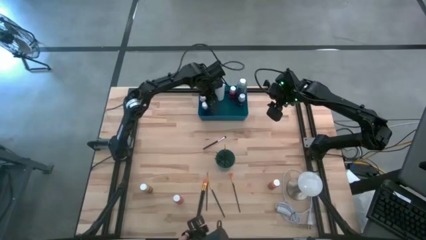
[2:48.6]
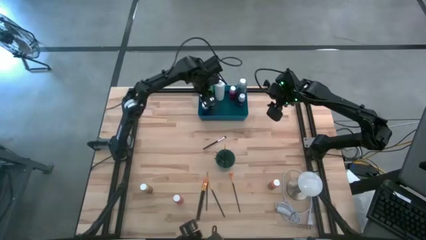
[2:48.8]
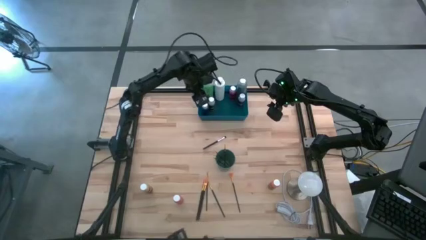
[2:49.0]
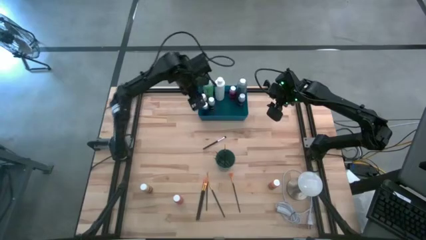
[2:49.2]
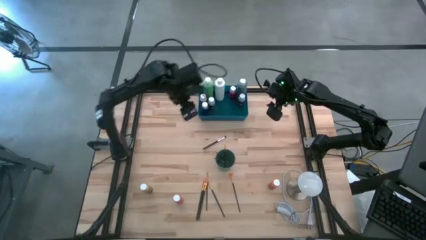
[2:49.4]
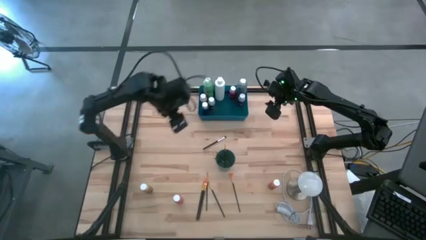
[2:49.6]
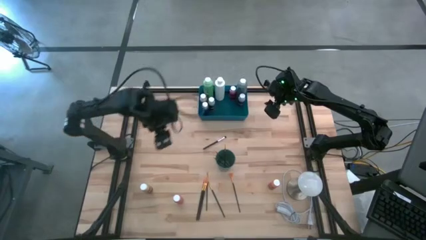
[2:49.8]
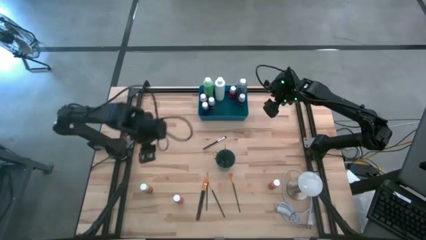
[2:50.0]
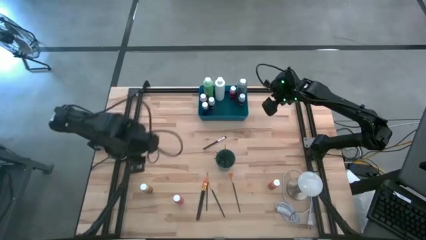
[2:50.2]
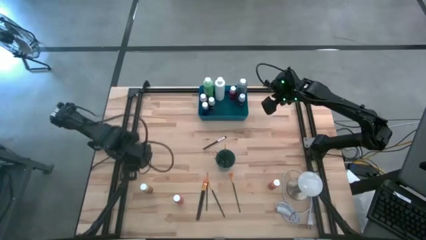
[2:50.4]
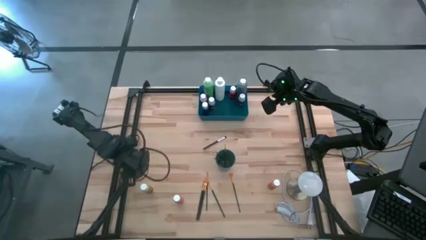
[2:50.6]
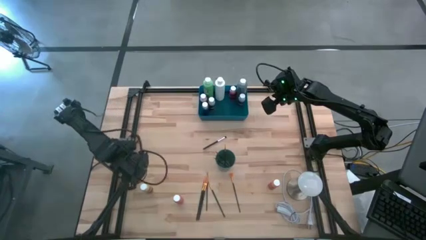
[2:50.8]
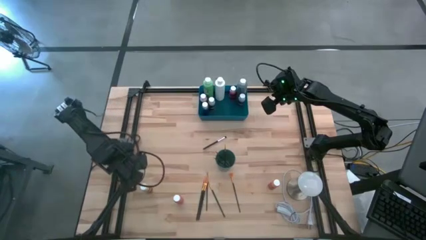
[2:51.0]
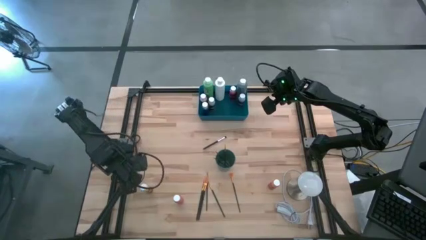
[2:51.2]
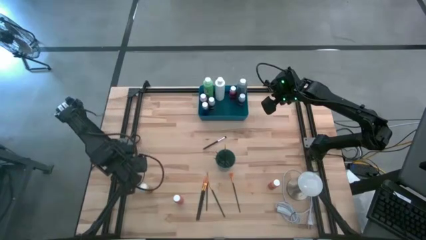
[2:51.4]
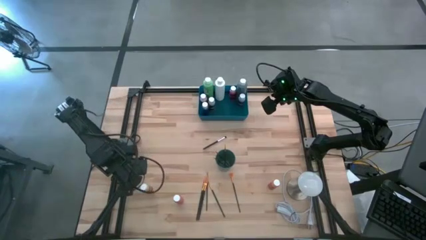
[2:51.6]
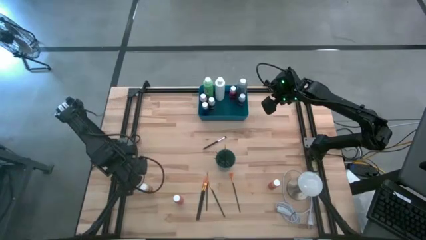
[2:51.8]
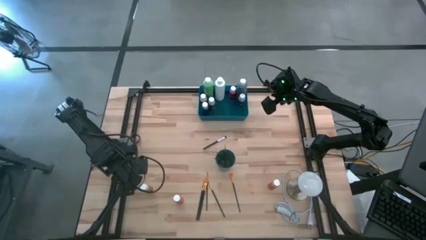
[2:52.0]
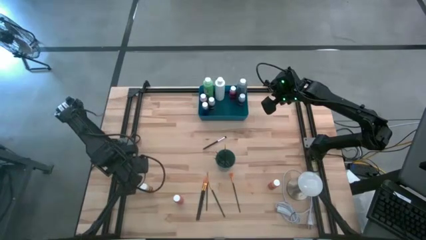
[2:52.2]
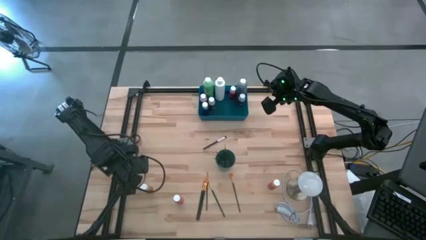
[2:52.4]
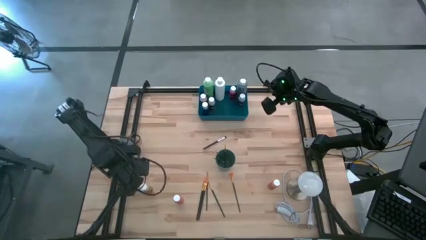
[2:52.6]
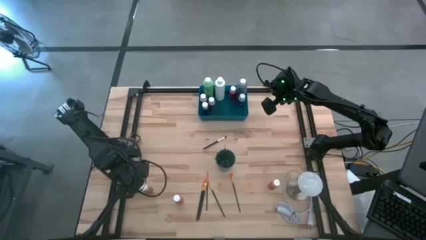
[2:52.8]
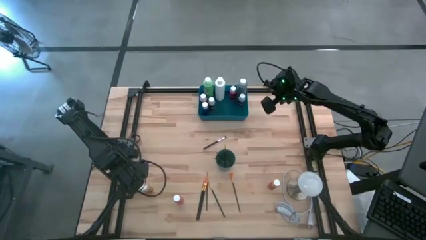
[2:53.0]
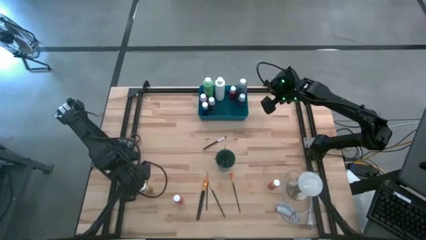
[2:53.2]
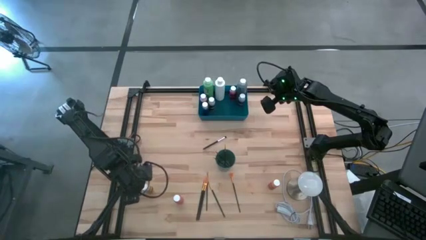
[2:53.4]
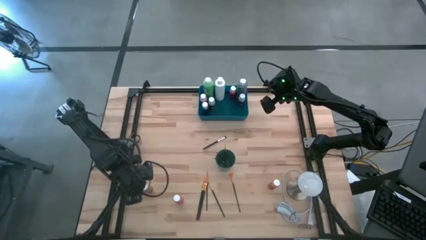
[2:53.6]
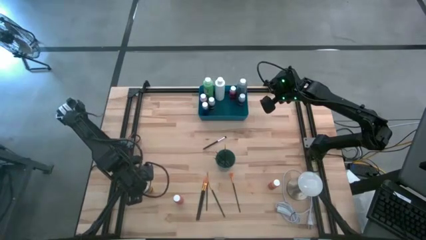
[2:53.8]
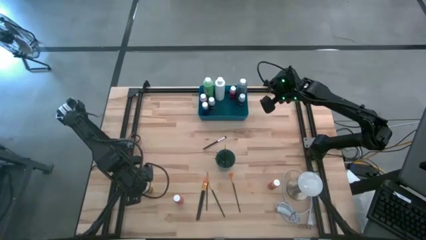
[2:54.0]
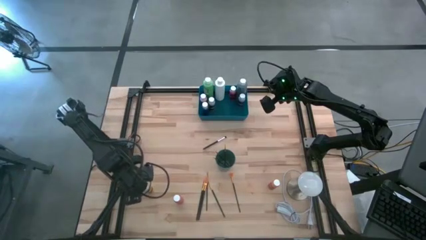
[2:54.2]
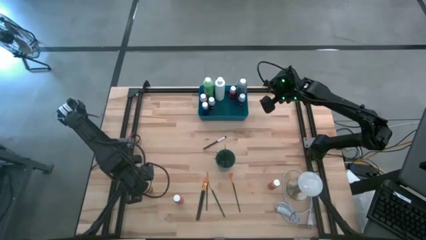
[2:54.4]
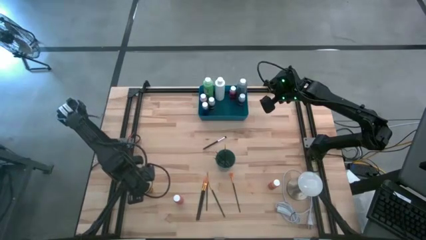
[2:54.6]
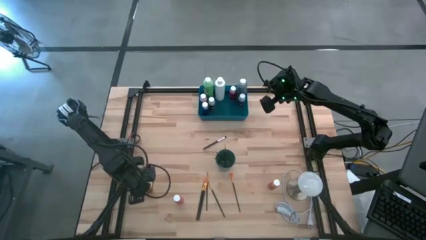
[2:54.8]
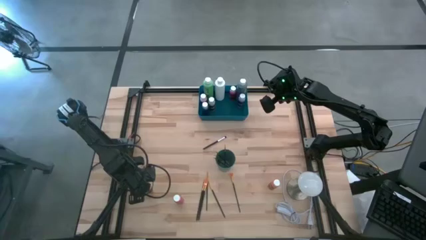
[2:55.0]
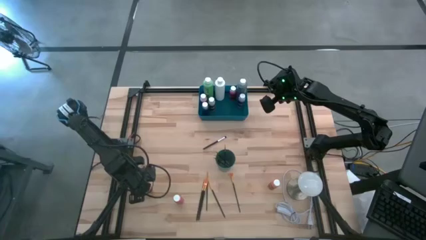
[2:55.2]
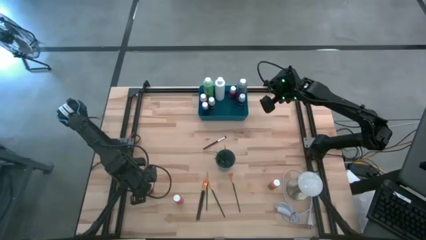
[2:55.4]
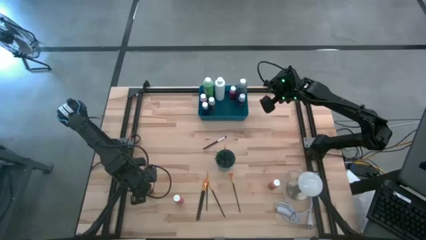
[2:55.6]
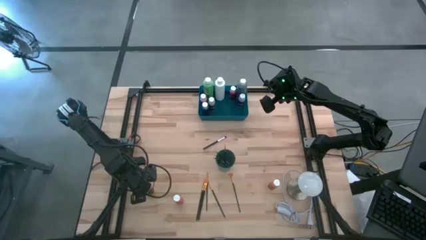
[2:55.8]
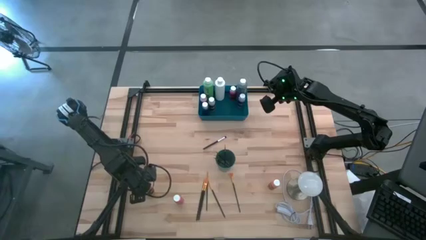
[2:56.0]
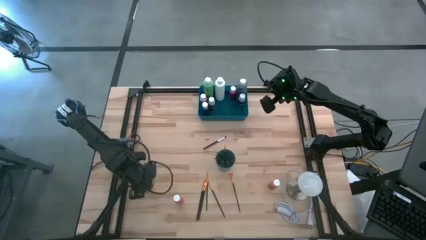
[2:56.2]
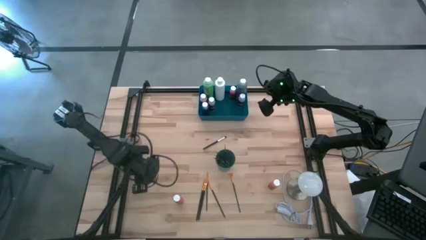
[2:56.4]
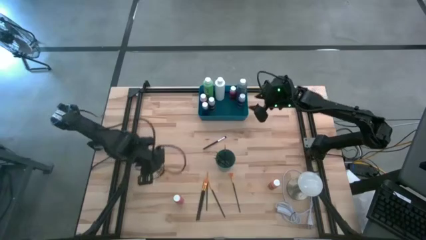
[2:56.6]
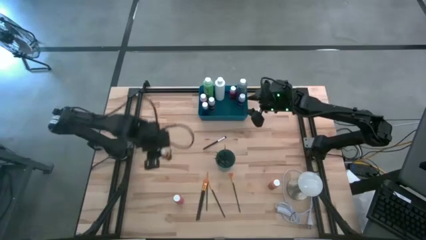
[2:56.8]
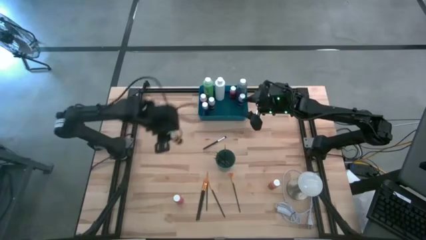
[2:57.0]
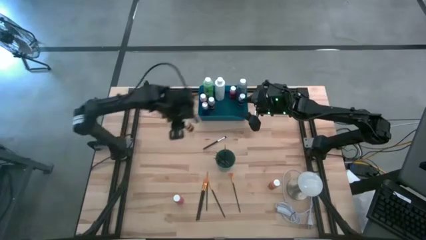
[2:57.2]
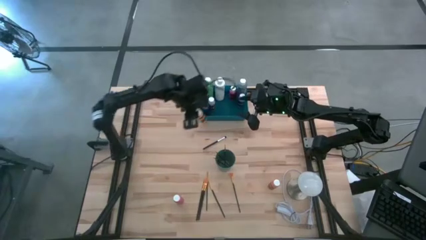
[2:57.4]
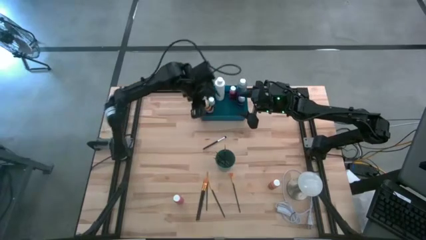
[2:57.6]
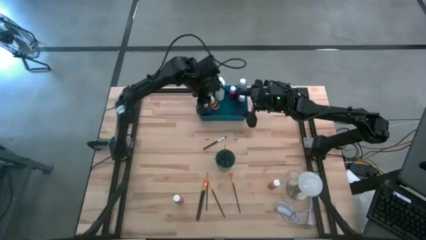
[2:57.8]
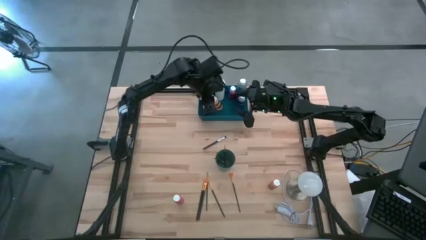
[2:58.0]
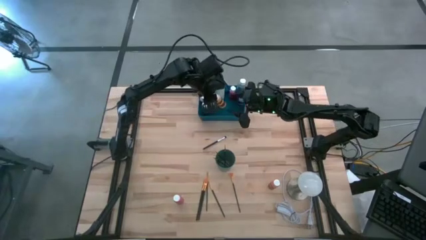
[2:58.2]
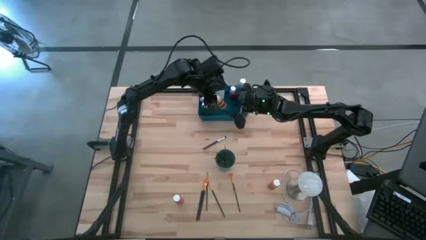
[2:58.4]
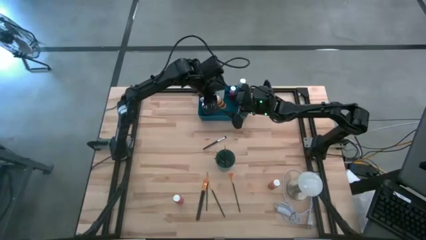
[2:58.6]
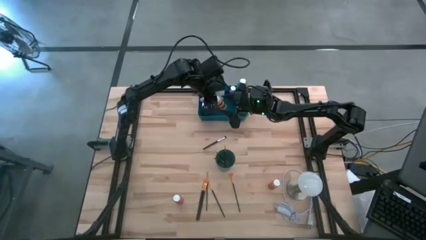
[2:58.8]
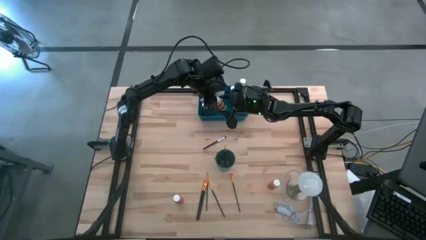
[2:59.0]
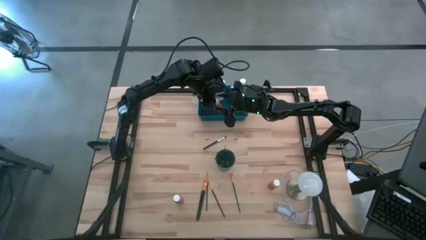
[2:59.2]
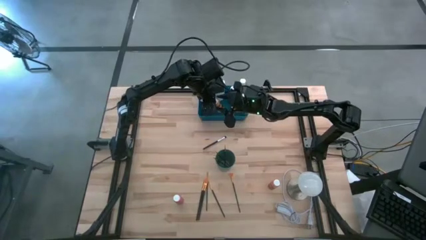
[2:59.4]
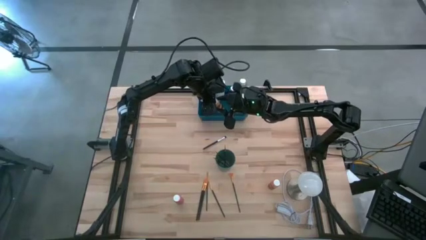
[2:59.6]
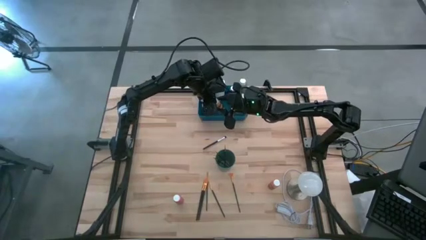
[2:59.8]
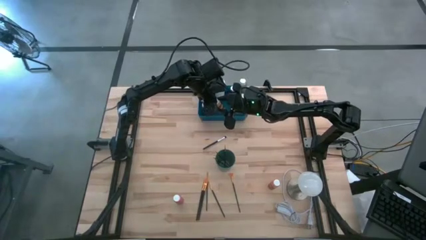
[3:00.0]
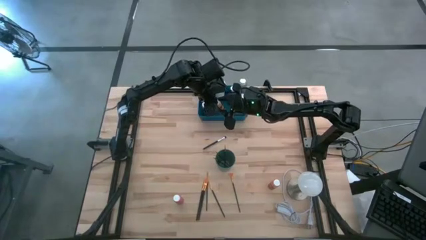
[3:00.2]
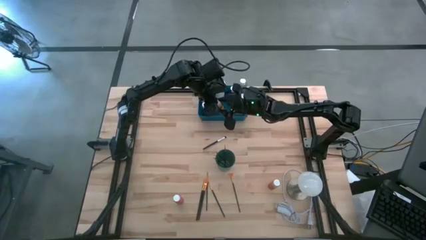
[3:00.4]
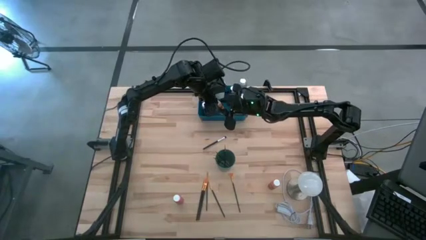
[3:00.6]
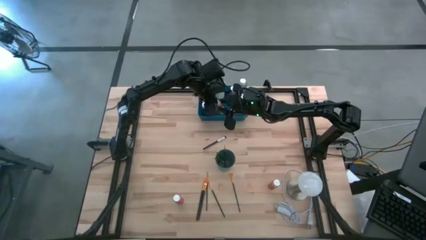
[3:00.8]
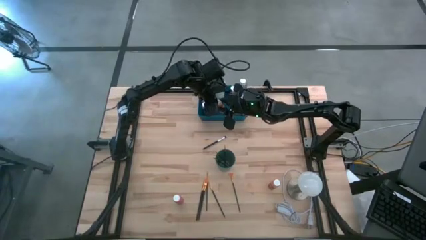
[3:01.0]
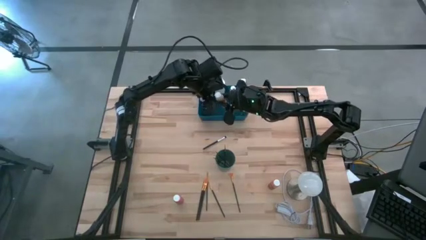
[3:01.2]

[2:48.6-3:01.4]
Task: Pick & Place Paint Supplies
Put the yellow paint bottle into the blue bin
